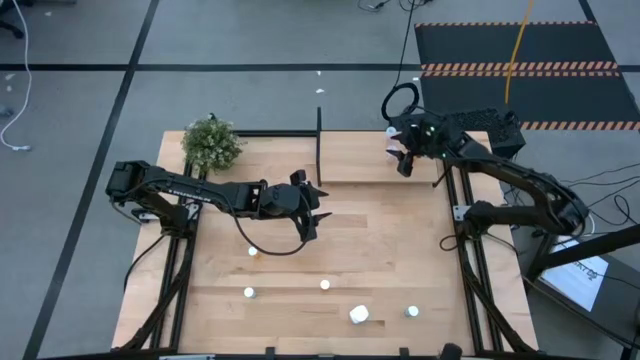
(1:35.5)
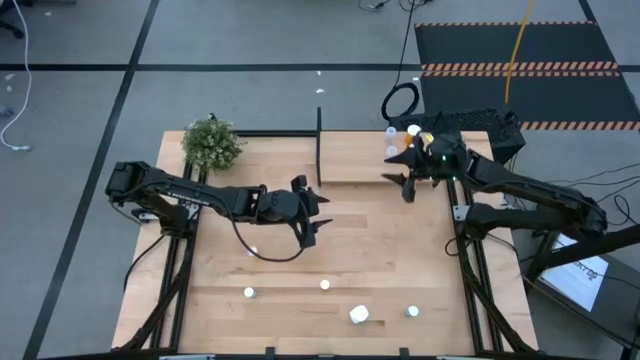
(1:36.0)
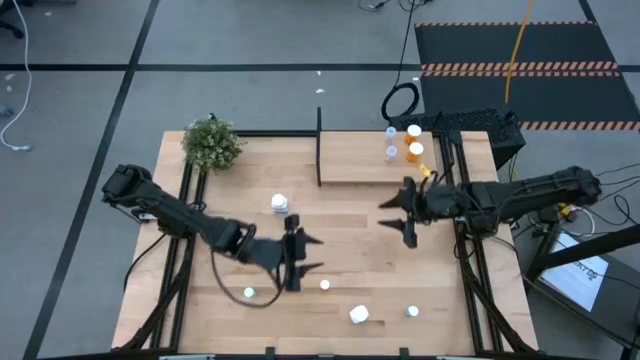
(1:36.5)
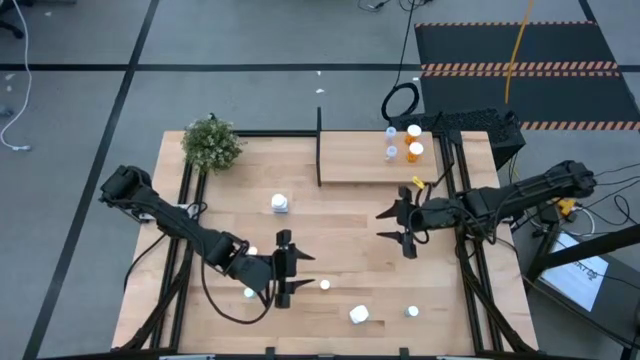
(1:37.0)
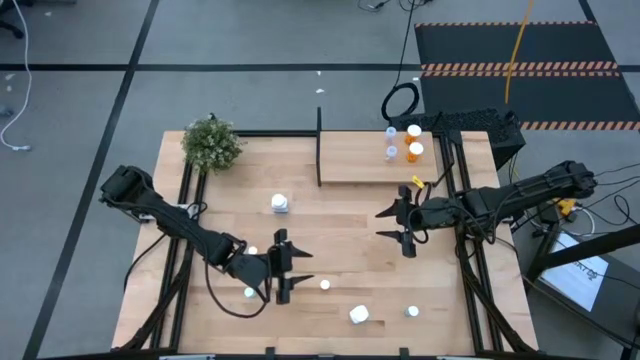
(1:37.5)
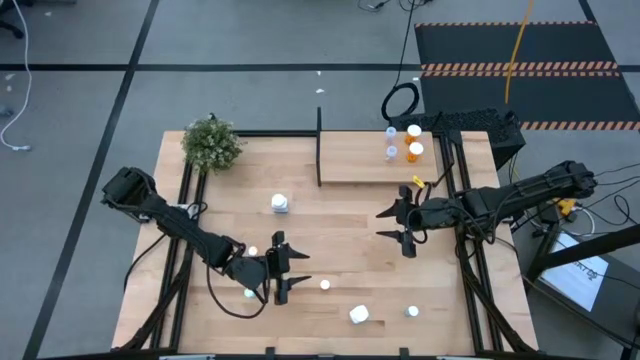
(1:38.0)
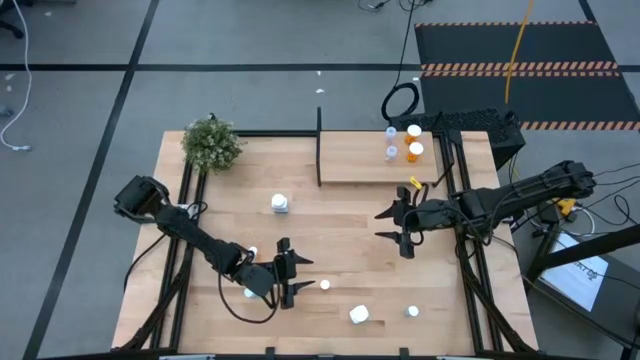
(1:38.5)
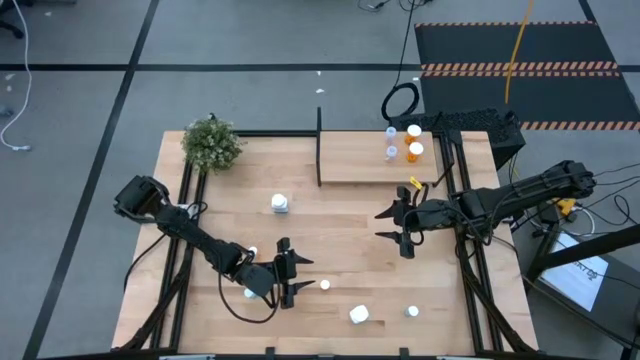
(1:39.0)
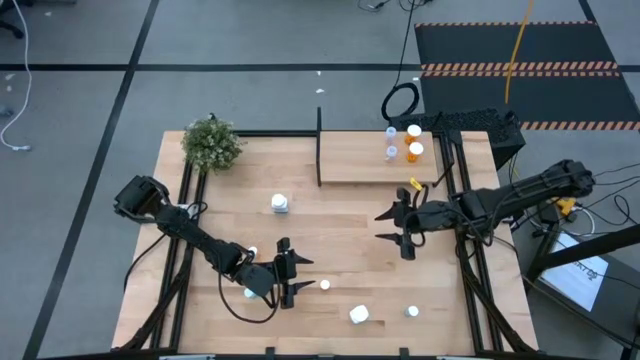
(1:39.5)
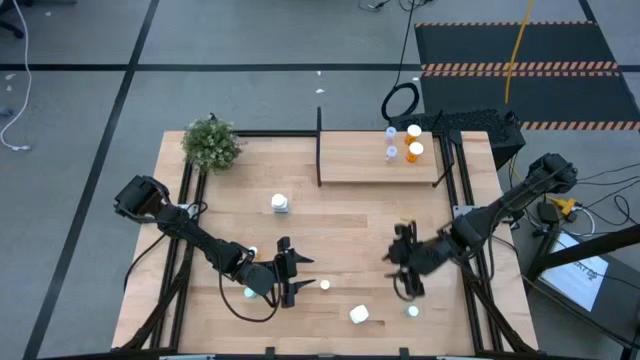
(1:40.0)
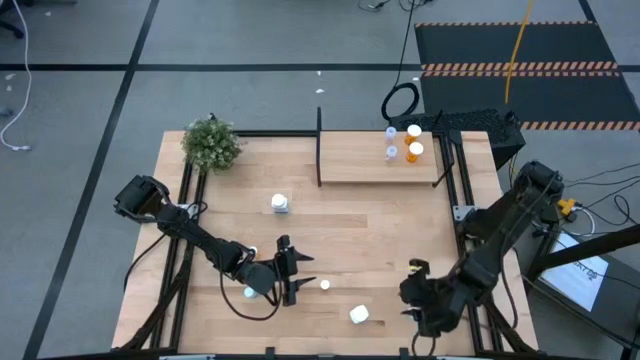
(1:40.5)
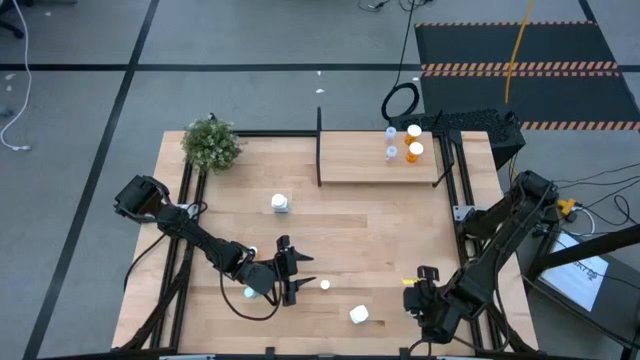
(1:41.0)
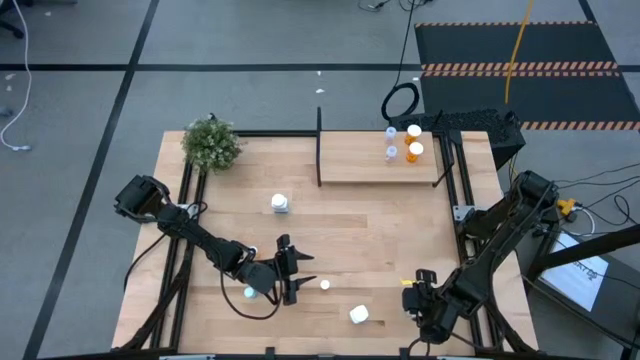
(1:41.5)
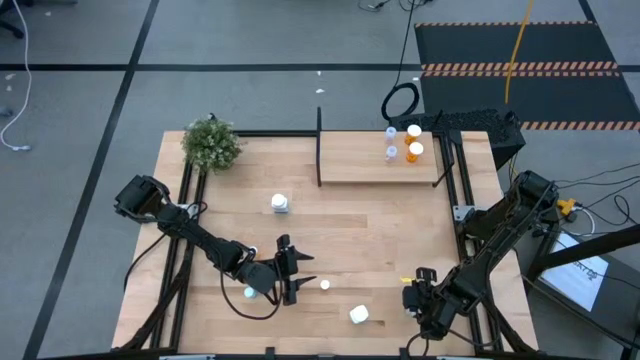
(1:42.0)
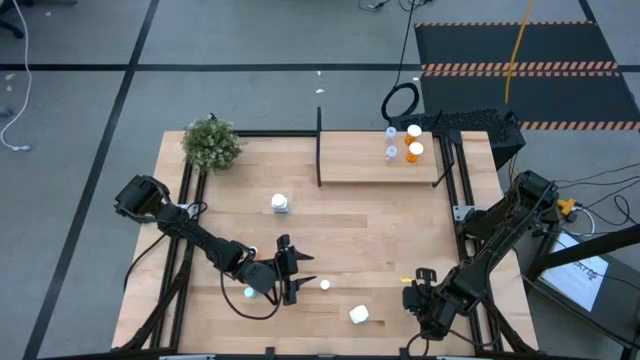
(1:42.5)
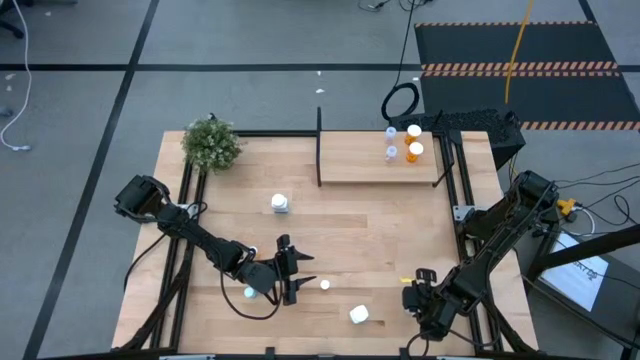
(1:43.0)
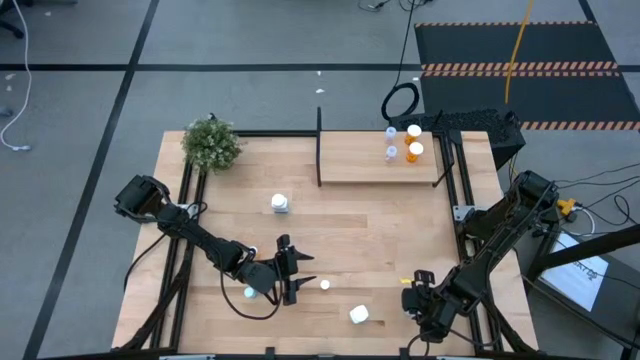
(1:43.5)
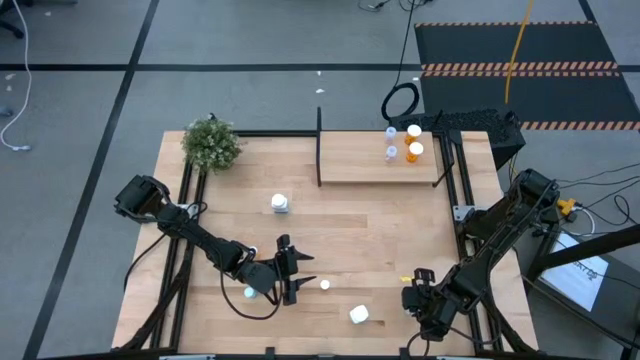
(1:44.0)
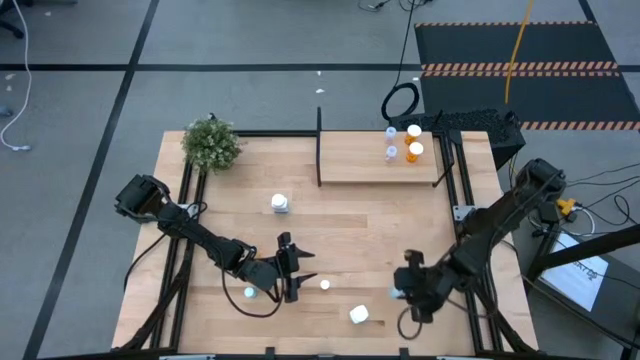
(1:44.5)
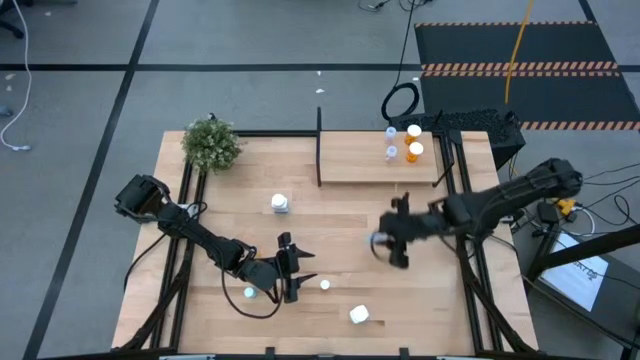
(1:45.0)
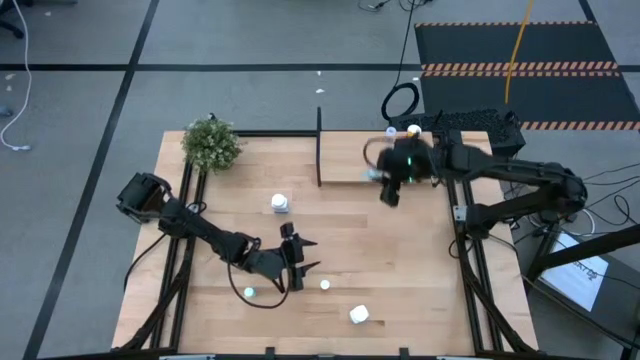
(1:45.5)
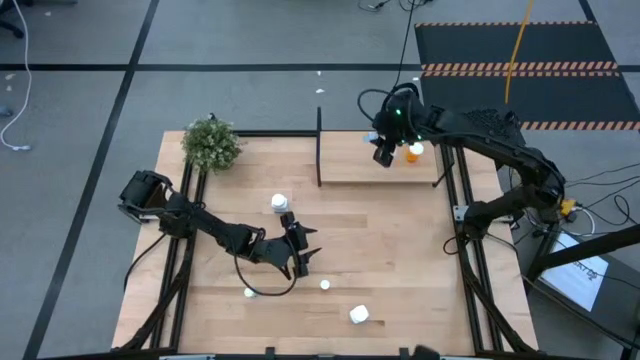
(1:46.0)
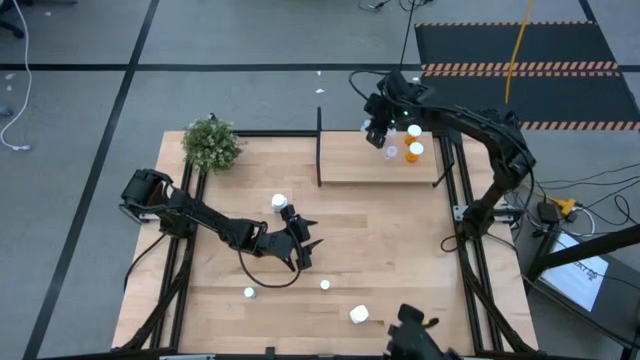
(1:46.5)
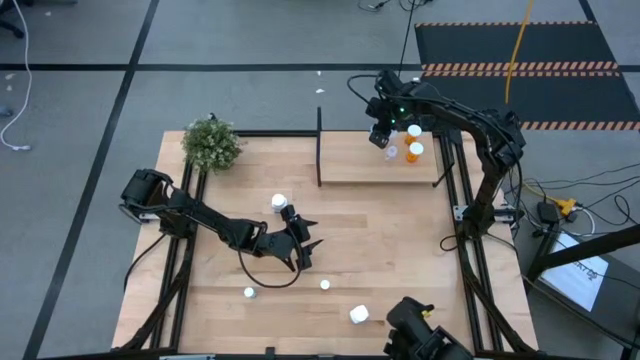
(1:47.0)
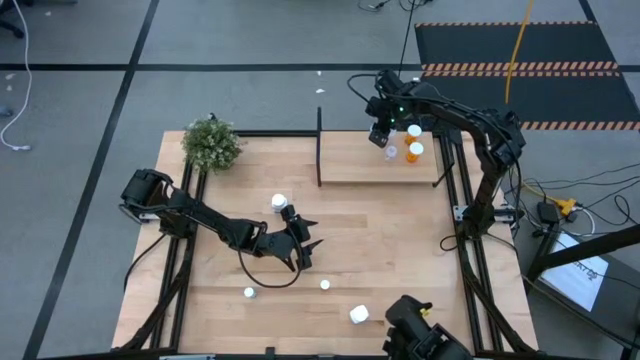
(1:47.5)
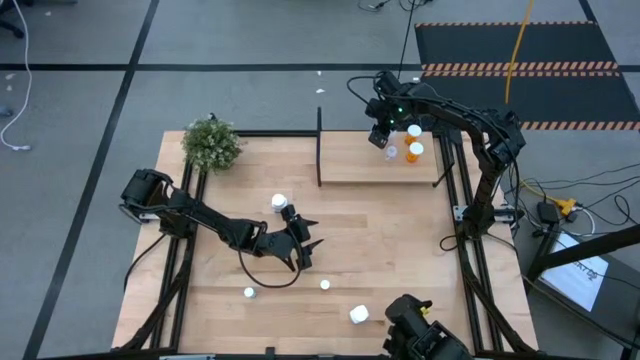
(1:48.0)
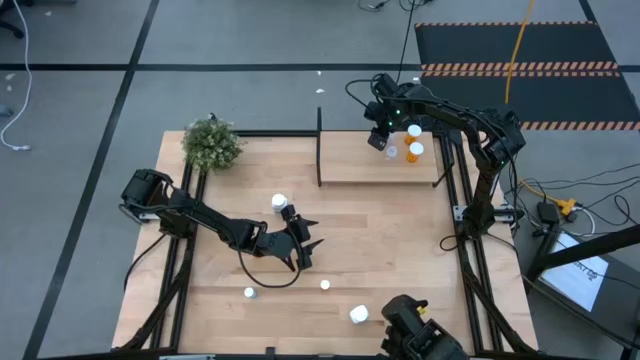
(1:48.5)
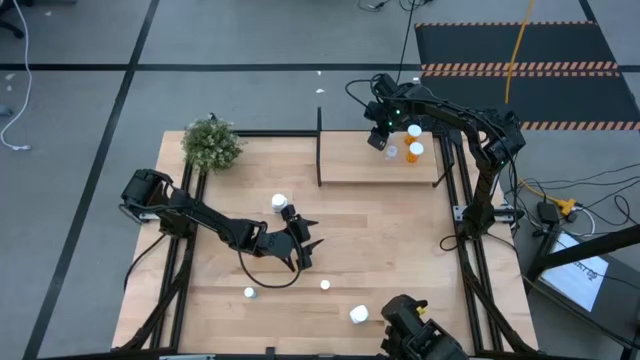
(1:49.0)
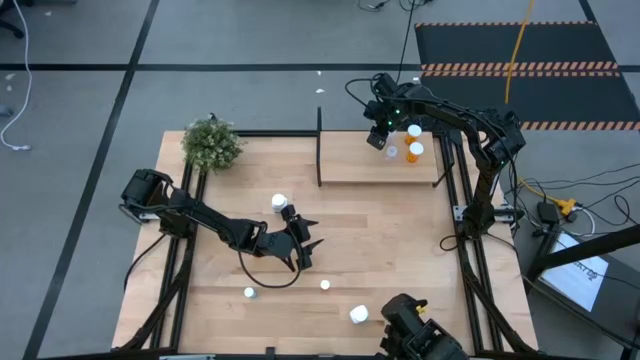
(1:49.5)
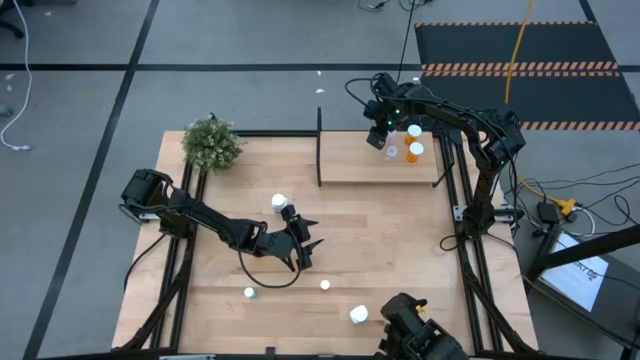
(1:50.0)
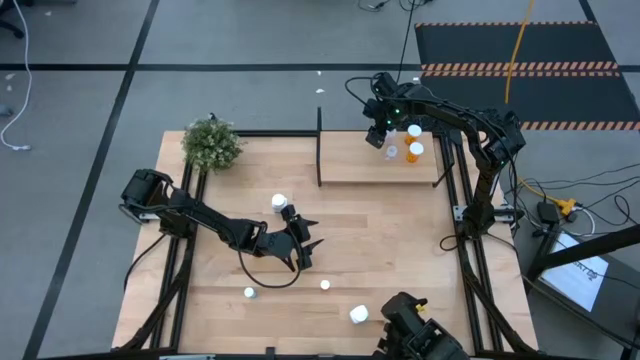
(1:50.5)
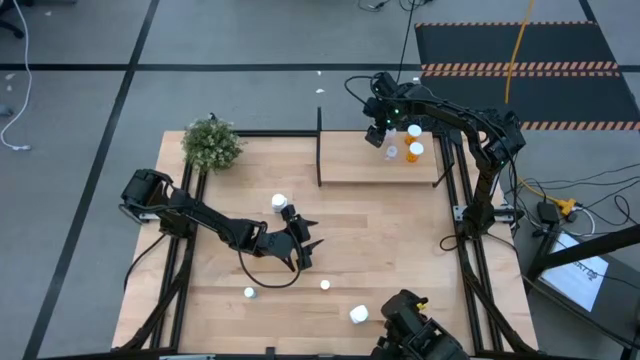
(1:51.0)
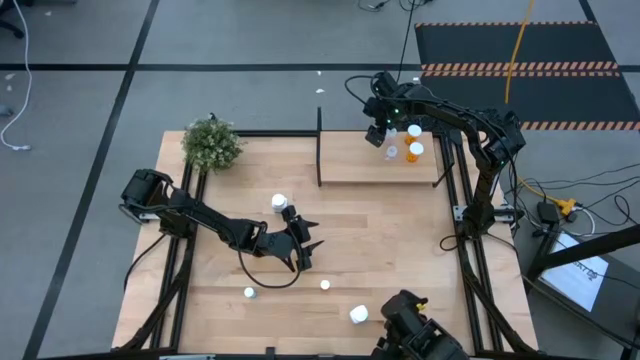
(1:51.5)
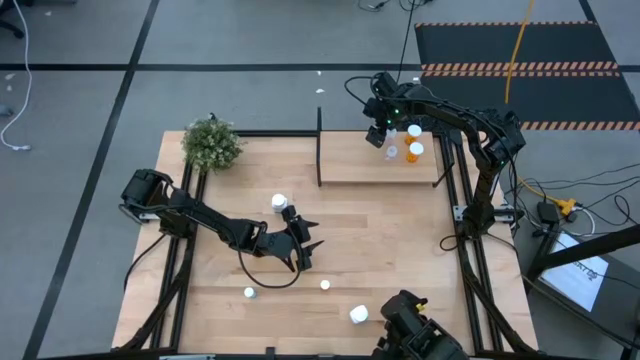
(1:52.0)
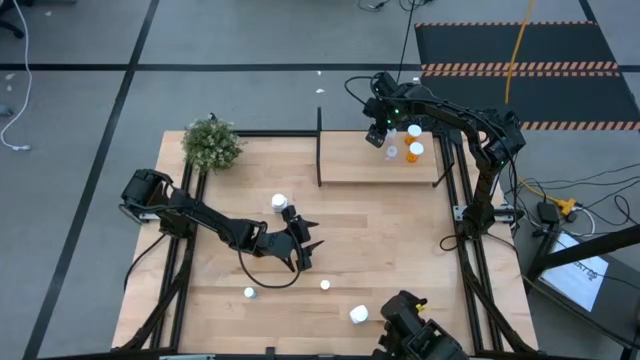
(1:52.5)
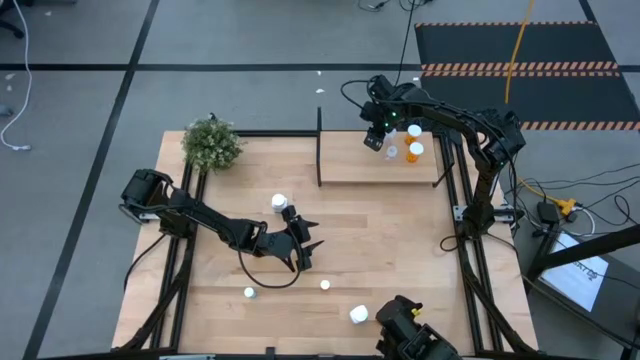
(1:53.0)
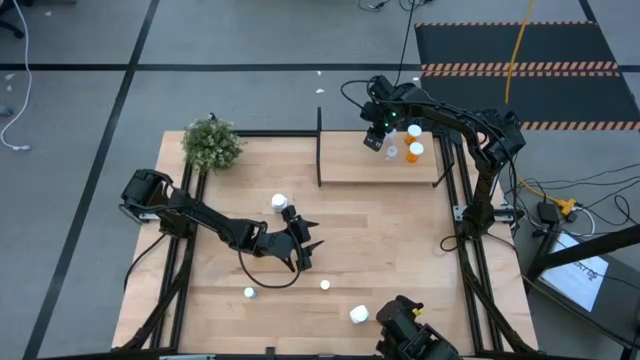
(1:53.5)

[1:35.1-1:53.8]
Task: Pick and place medicine bottles onto shelf by color
Put the right blue pill bottle on the shelf
